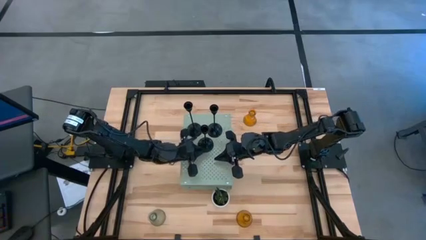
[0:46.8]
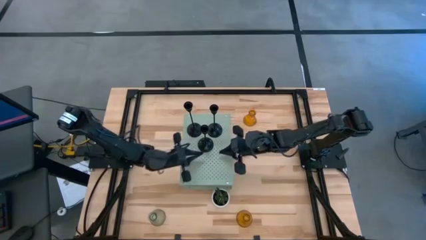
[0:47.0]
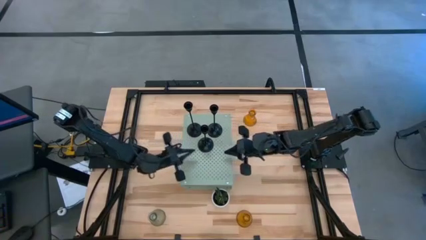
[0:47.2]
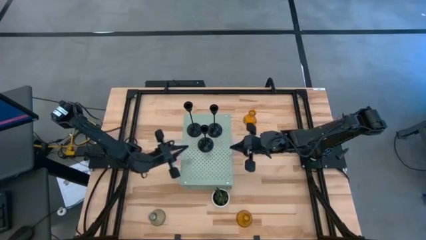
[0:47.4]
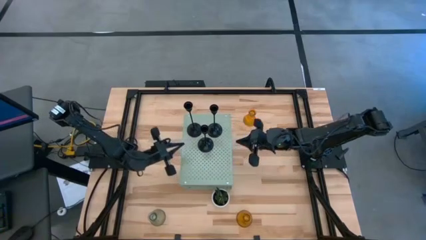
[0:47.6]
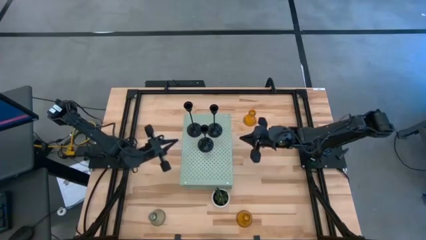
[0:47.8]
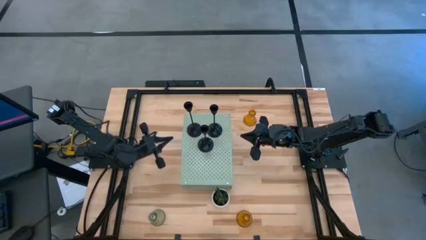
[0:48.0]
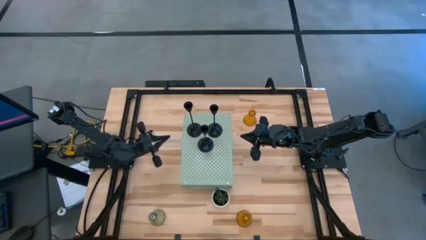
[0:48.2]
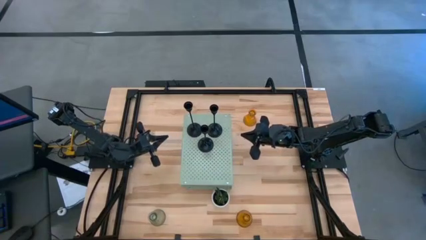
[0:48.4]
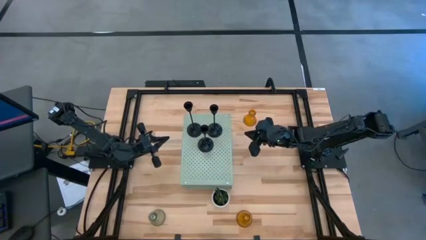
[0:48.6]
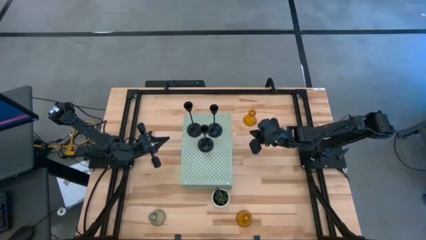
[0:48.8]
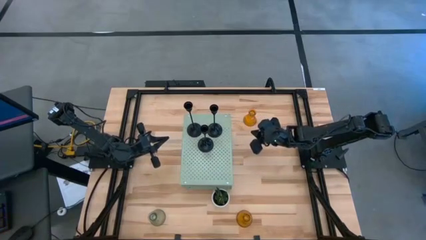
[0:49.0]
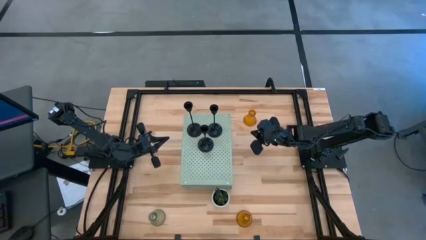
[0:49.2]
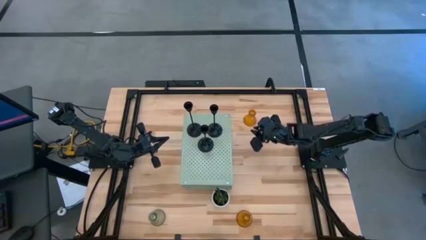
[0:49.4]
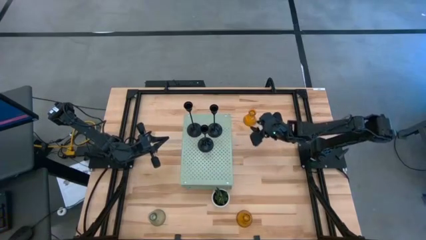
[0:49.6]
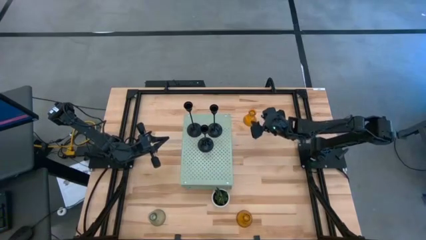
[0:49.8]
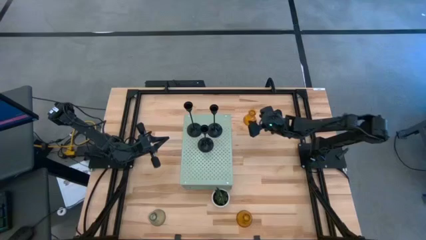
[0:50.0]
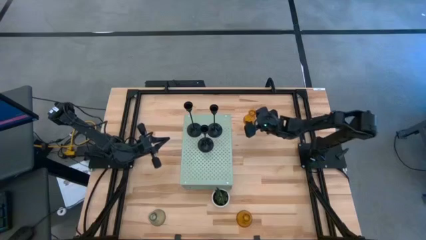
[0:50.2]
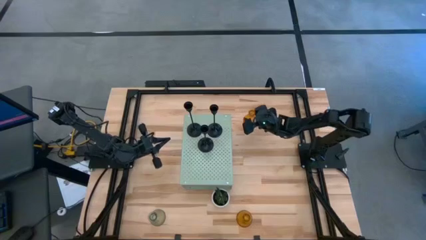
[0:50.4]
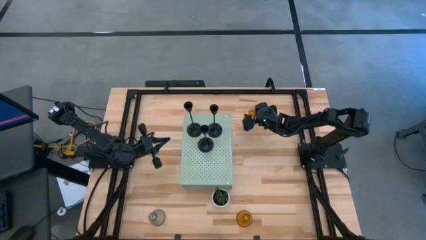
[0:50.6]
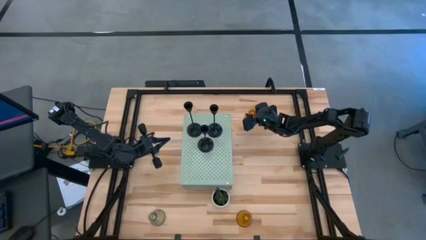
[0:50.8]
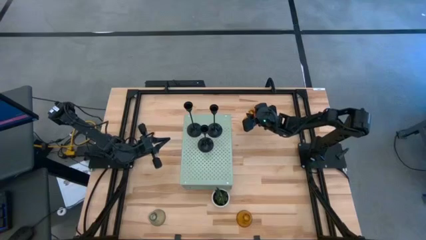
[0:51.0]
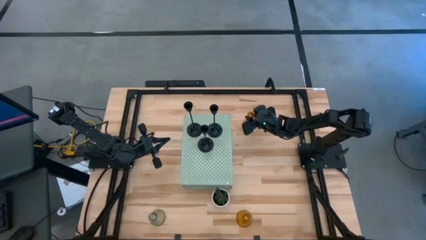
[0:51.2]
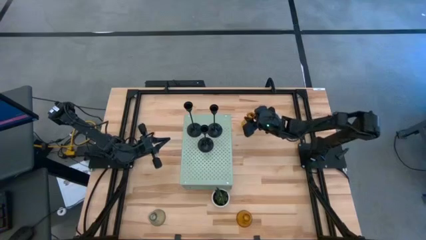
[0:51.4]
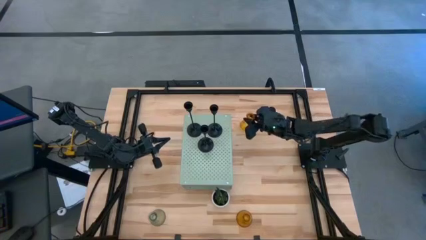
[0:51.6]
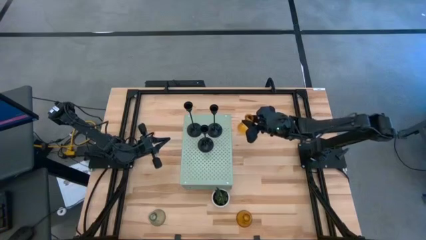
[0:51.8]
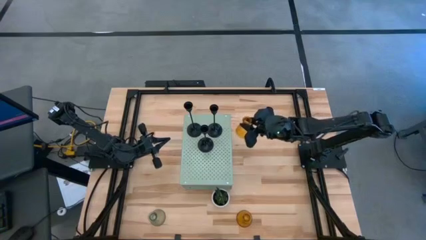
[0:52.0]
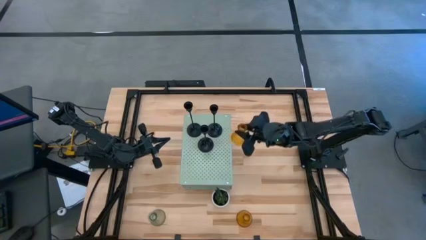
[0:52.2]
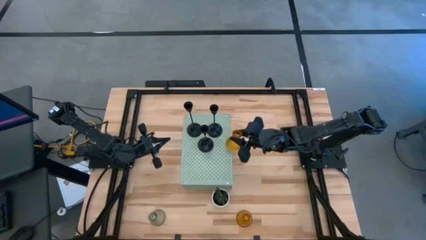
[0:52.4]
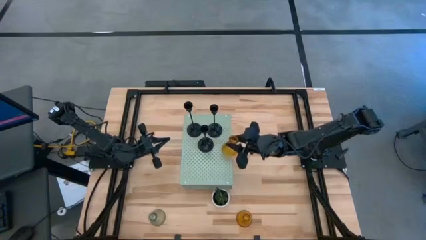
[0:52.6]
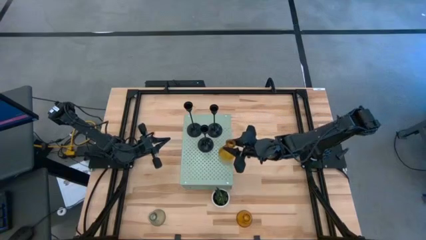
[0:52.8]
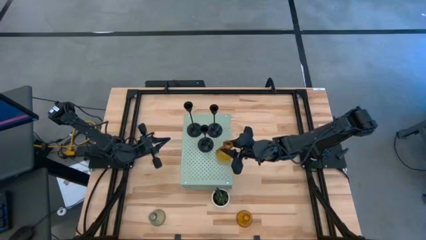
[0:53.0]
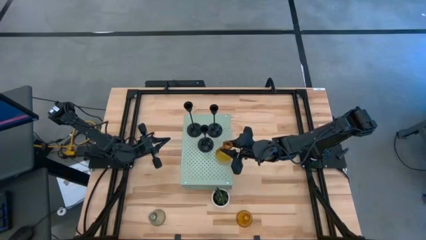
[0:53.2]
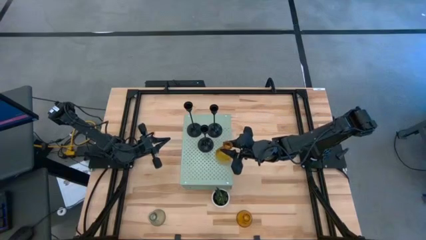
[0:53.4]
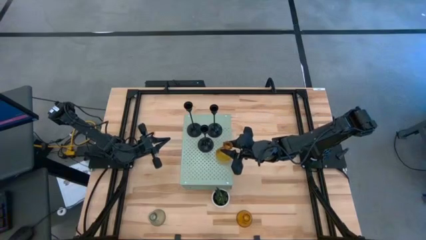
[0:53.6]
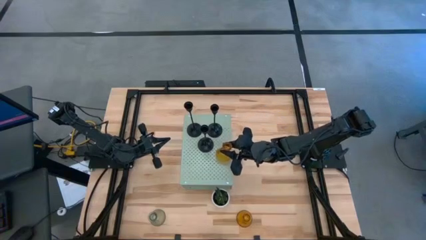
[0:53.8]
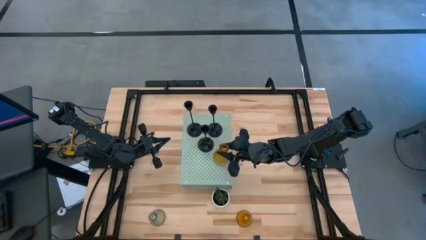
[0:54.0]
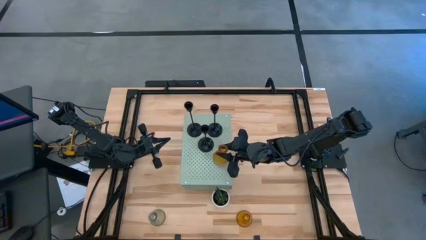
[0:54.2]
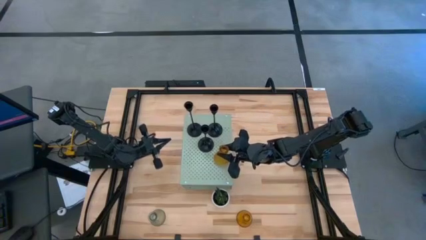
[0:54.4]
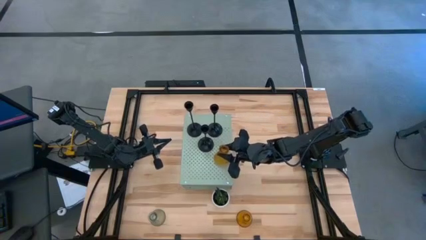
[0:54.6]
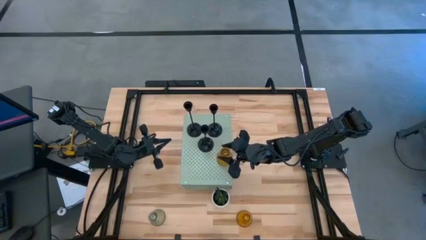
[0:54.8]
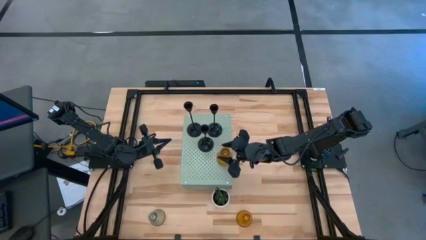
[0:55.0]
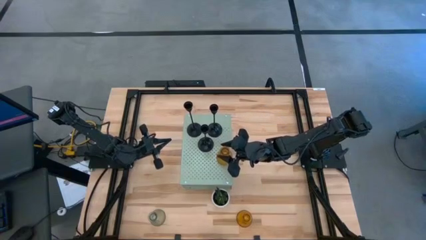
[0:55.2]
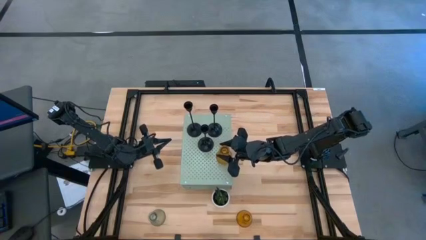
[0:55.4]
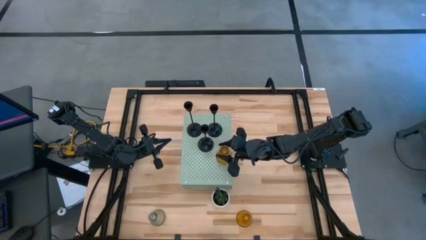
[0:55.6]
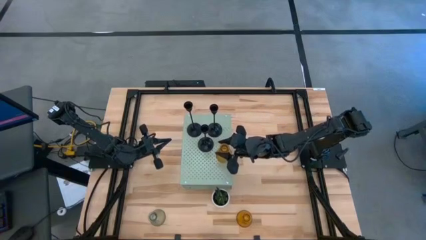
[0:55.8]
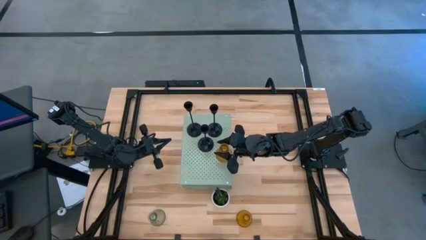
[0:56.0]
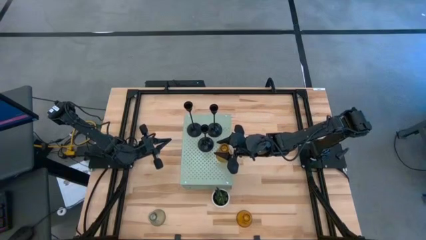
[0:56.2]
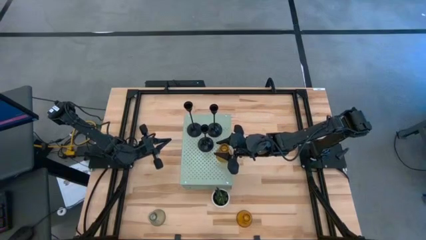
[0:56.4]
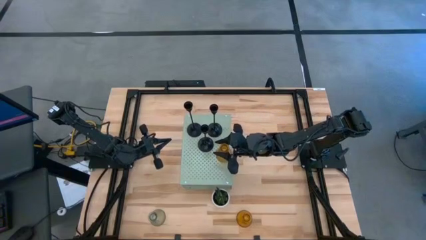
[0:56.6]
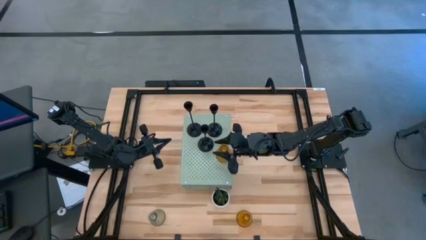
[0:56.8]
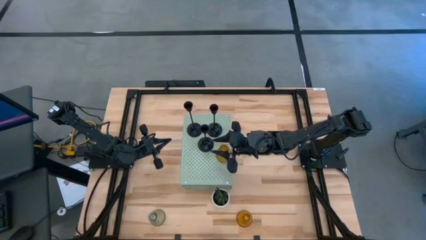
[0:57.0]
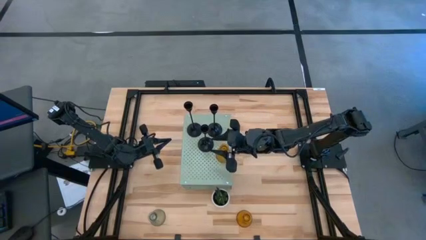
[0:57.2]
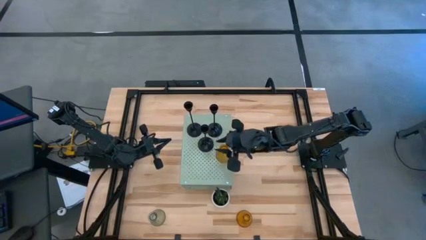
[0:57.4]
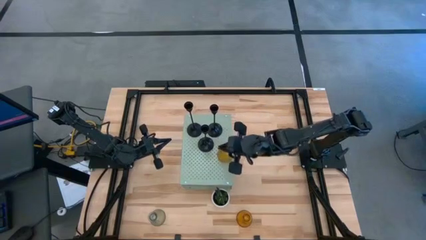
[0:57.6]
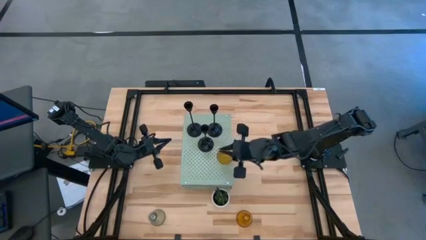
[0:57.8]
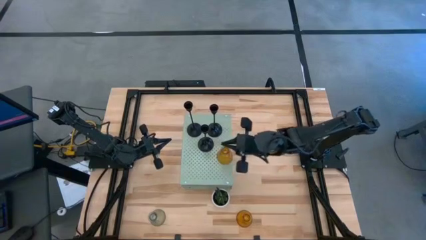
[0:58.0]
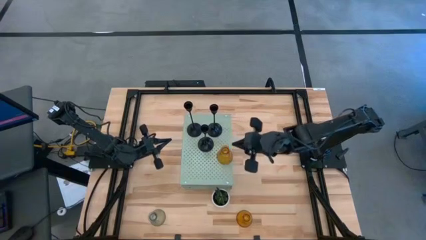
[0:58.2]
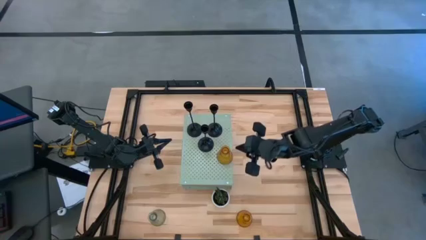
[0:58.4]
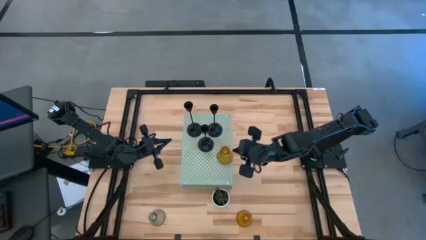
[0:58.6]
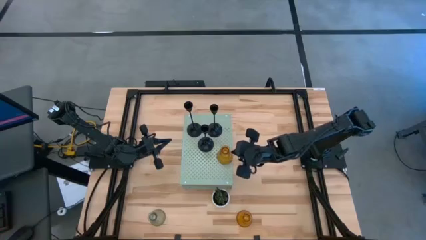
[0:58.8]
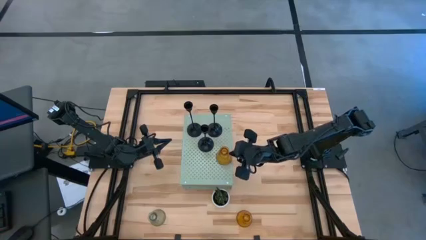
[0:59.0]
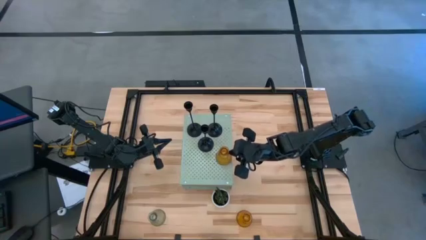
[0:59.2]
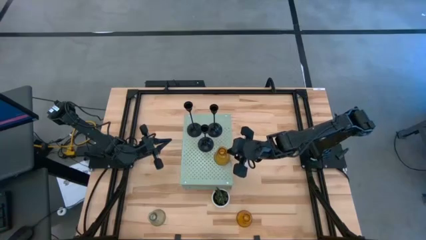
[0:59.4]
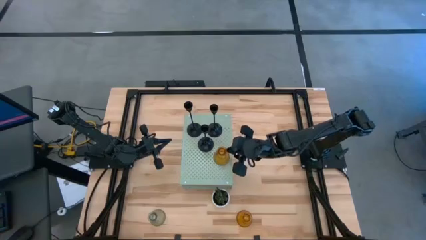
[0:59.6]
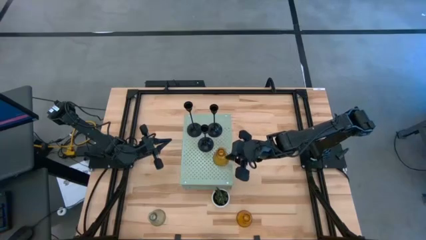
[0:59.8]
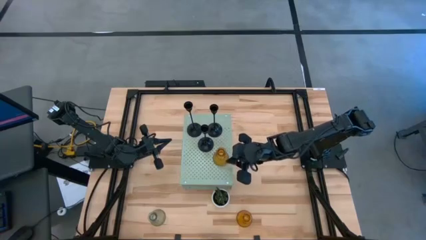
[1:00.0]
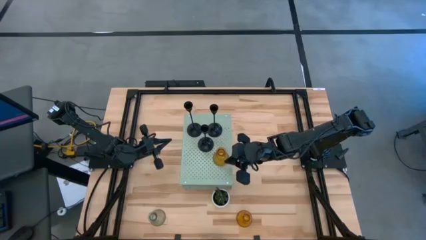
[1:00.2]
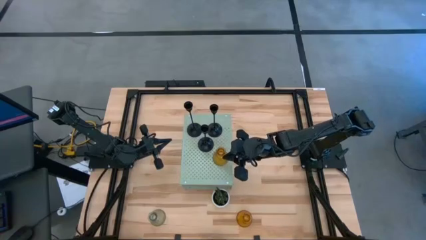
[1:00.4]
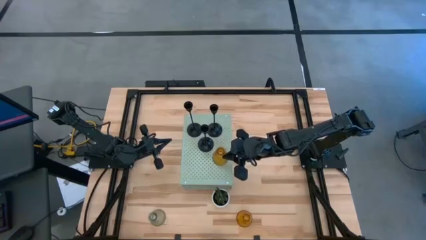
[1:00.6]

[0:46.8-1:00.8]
Task: Pick & Place candle stick holders
Put the top yellow candle holder on the shelf
